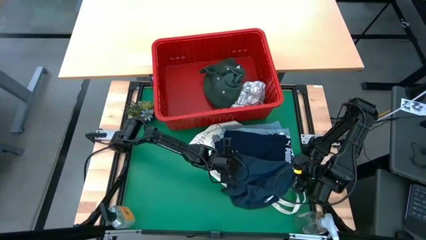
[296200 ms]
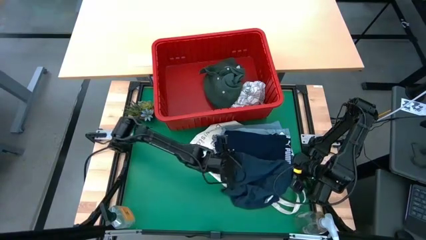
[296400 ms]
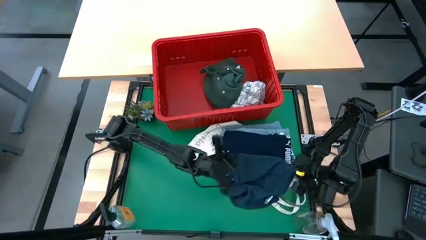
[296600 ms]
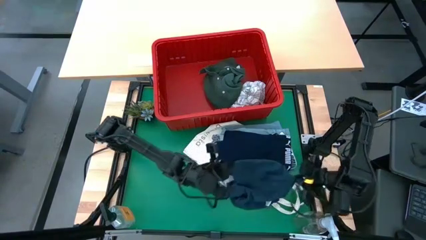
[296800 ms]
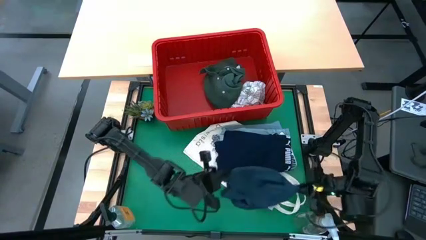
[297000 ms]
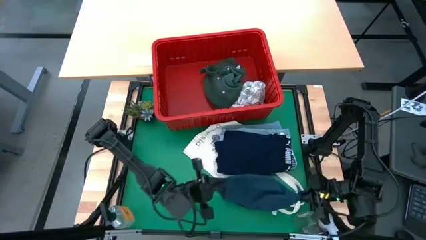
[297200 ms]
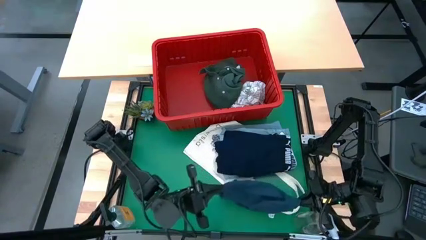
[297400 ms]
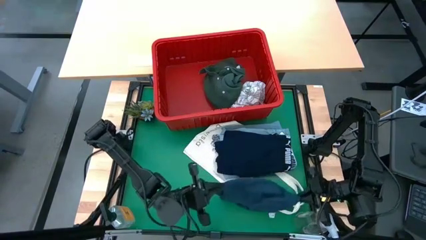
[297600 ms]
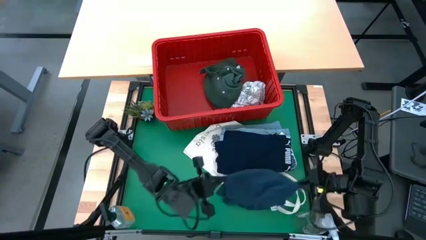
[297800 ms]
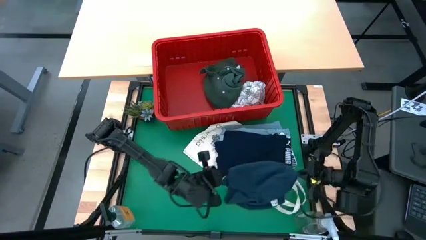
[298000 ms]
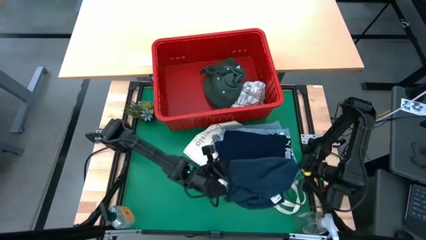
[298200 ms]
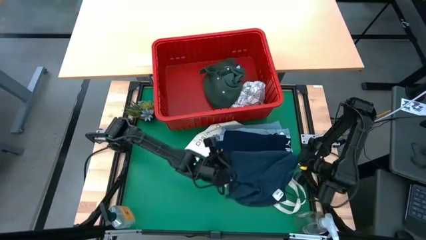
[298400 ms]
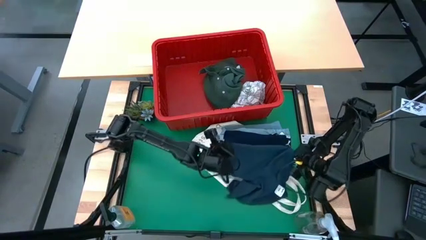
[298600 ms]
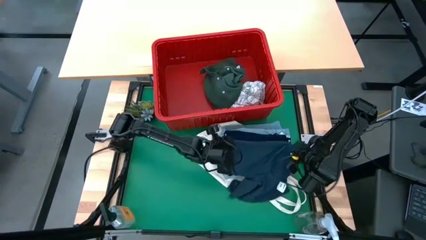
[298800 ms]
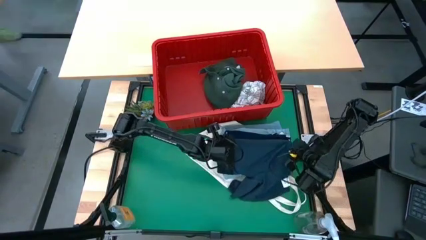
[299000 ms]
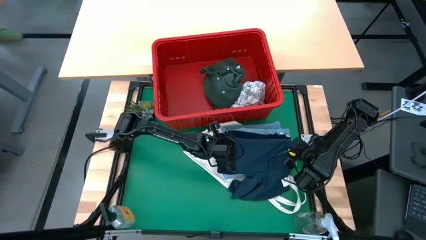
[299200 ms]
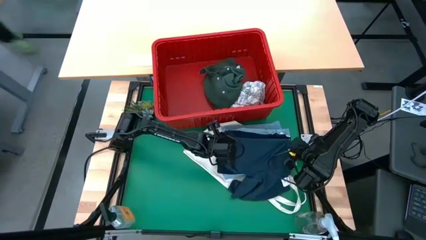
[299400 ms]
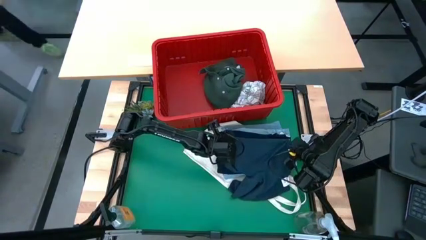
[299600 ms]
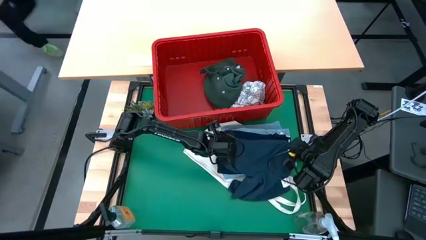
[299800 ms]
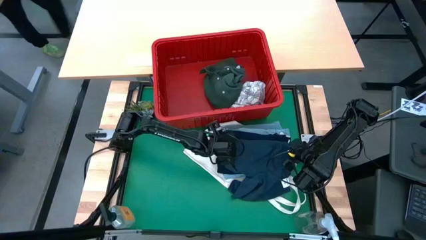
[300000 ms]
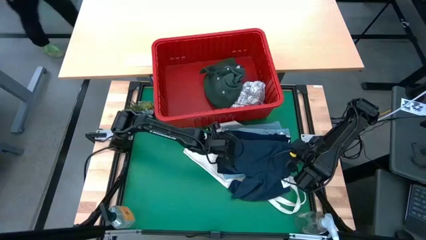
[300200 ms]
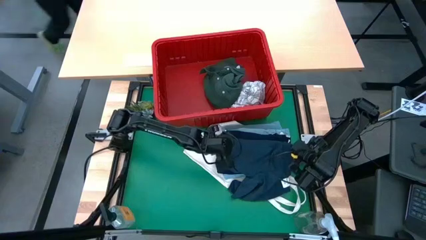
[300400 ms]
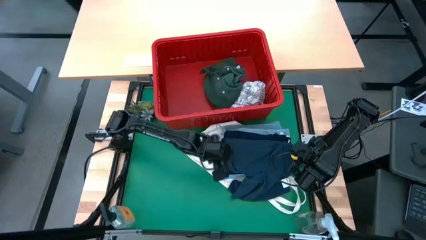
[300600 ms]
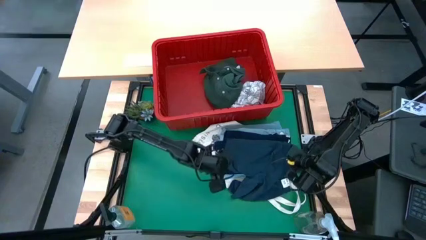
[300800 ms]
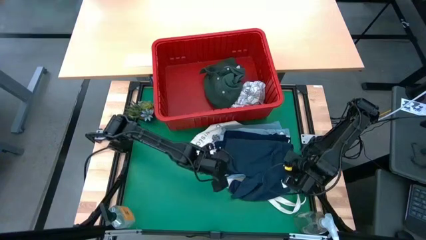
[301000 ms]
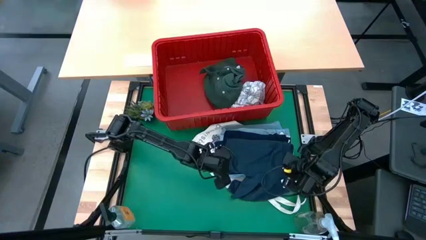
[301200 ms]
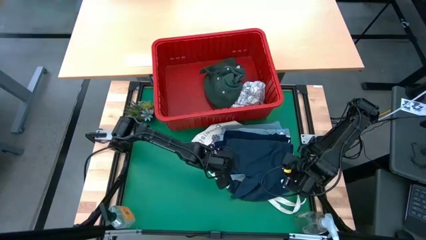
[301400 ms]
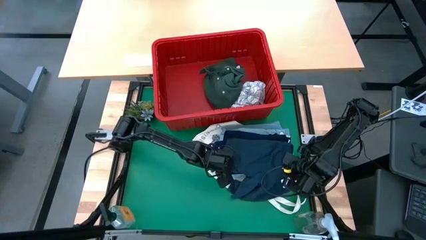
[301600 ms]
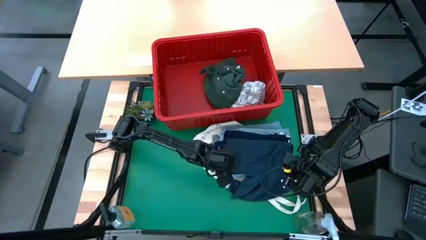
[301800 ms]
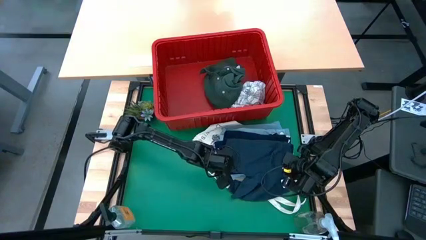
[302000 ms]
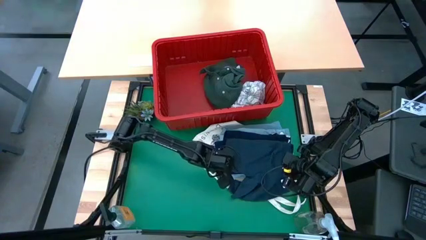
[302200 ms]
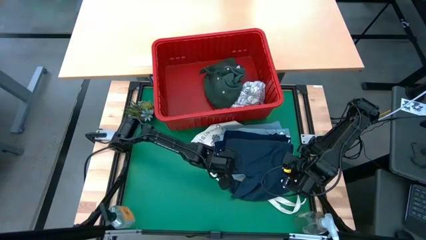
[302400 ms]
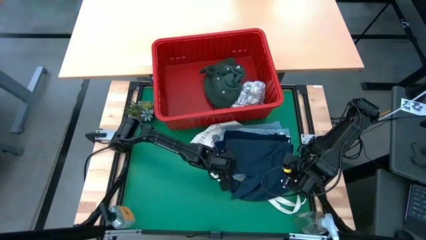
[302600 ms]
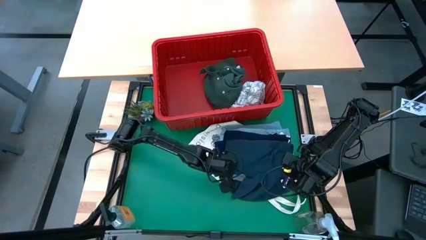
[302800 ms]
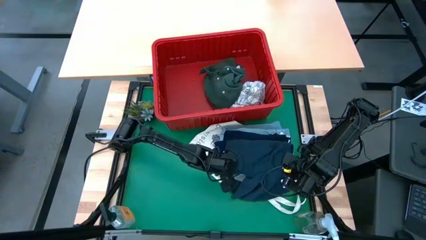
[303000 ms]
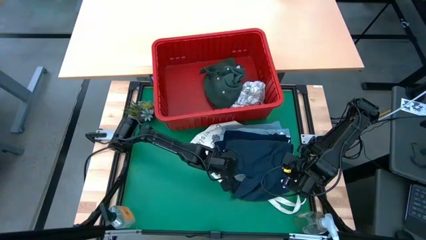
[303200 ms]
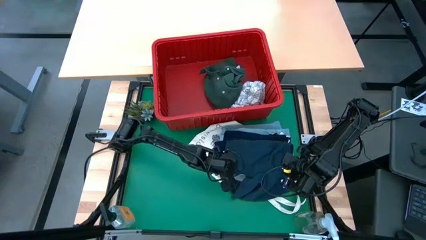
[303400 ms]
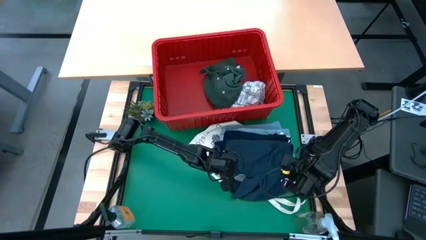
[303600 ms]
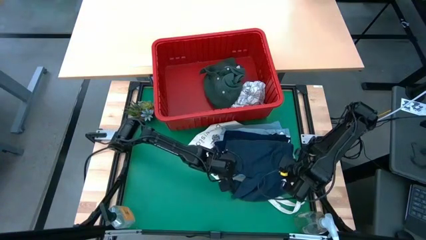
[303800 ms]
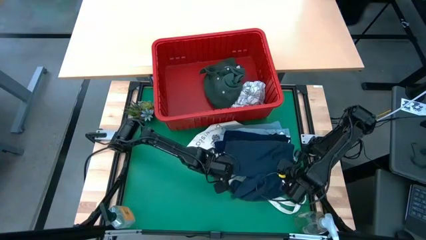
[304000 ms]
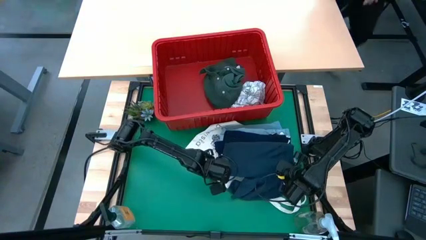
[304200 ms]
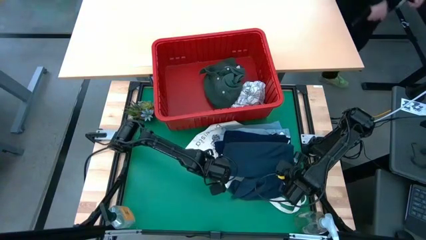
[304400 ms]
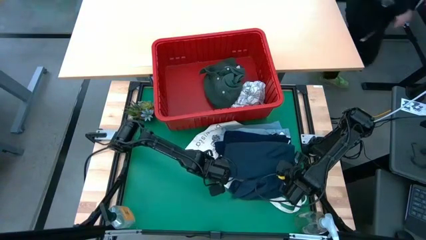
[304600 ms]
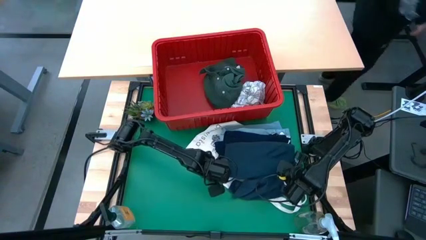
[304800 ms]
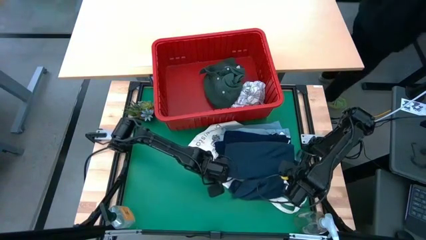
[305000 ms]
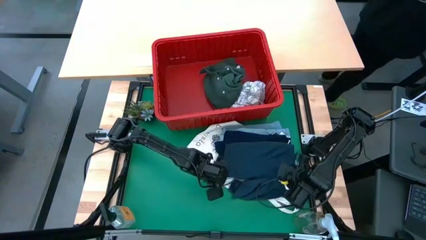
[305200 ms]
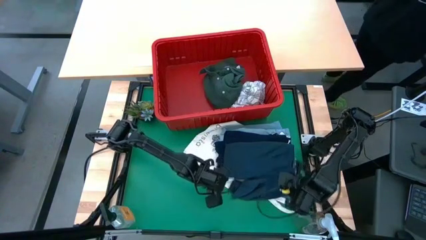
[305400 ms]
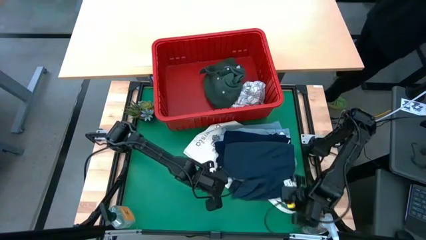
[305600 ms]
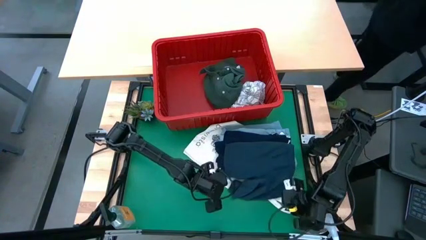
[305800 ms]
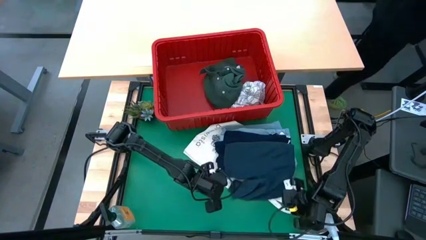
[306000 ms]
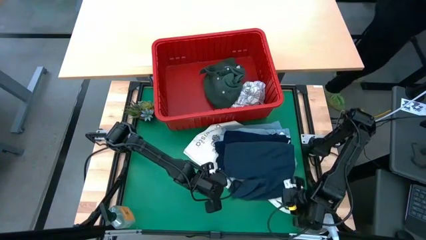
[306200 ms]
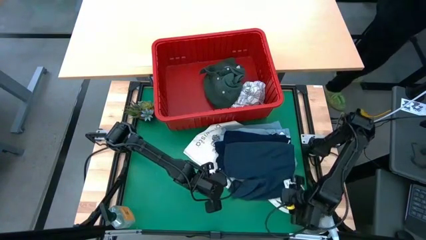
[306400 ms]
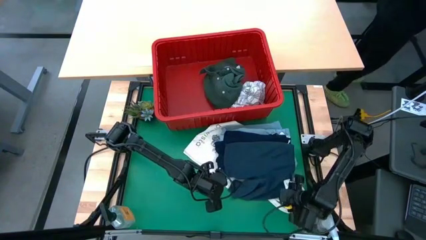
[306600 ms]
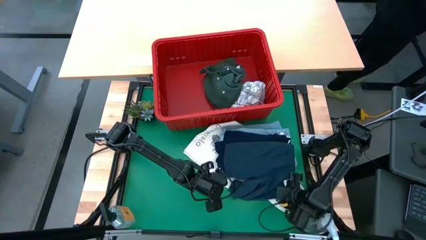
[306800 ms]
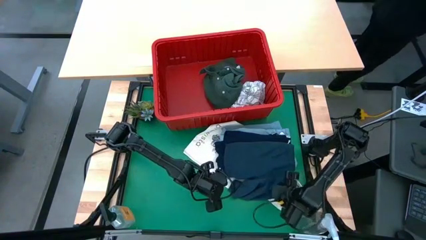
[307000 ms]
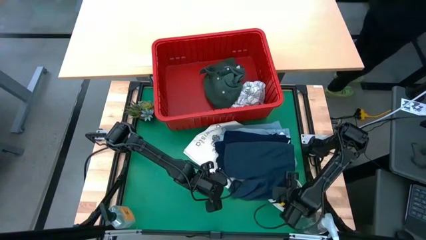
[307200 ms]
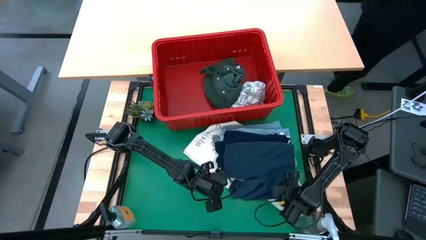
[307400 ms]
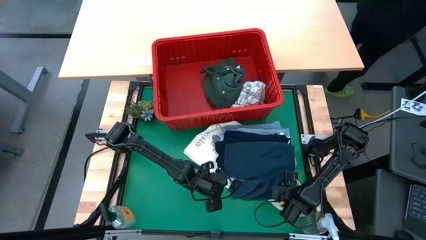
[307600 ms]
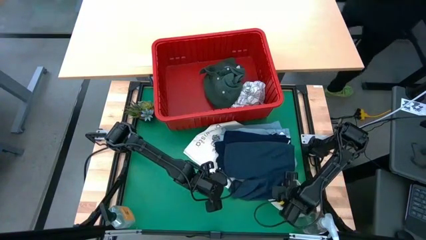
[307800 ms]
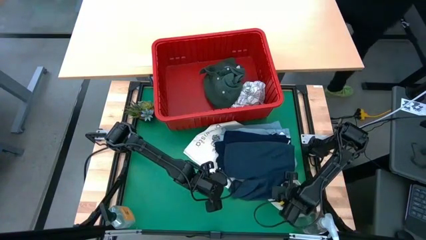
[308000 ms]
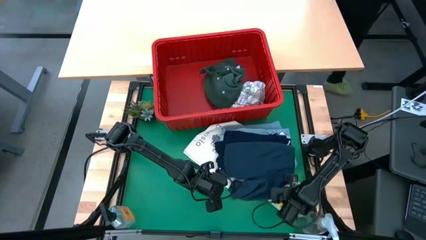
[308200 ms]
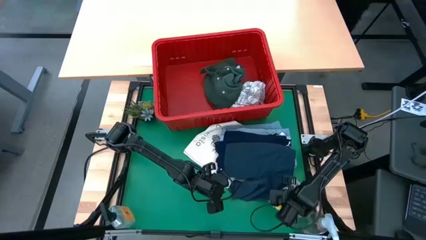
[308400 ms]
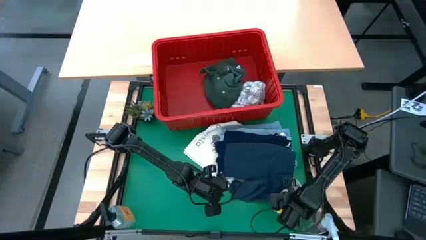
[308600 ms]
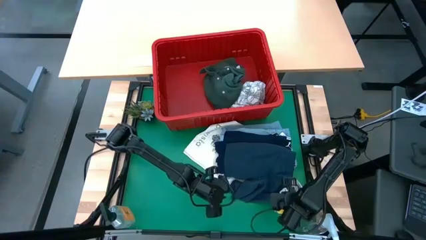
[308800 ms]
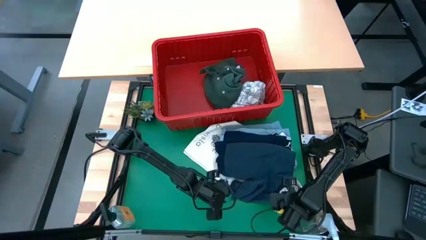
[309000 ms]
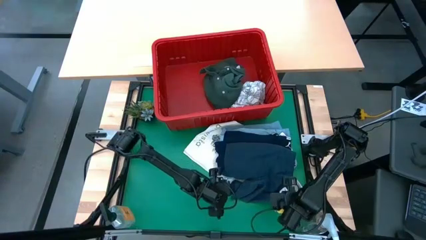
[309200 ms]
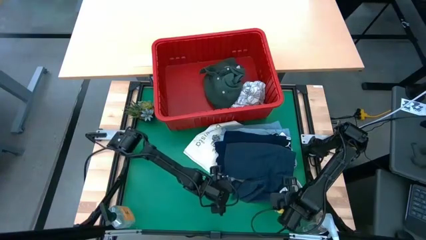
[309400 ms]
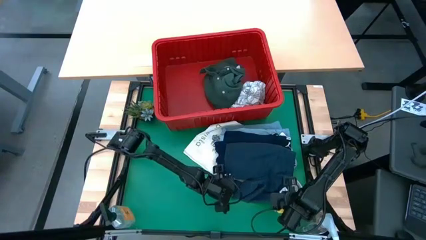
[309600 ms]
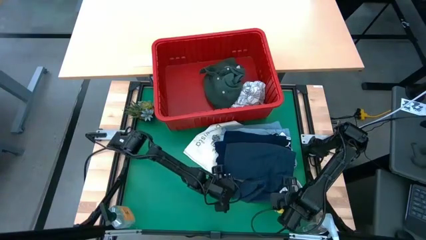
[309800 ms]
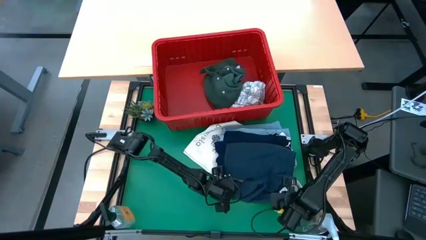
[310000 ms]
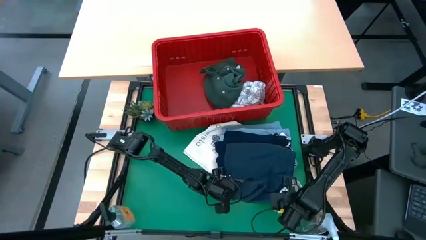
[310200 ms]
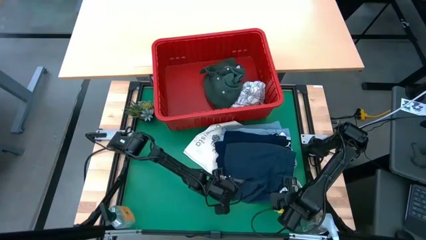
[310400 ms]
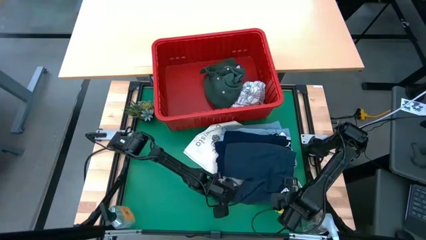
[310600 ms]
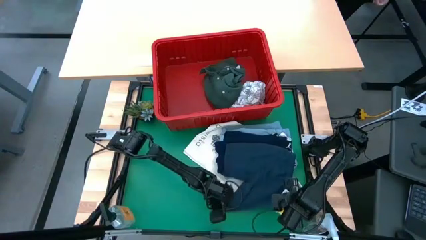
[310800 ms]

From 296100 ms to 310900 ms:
Task: Fold laundry
Fold the gray shorts

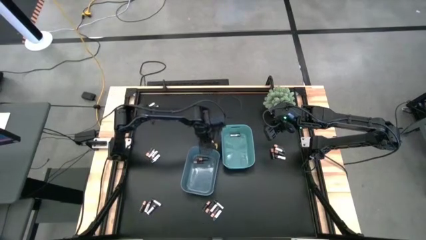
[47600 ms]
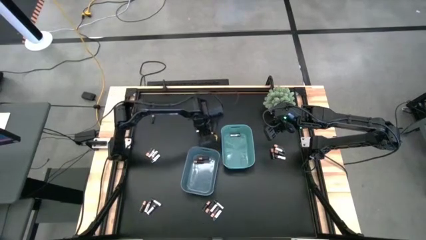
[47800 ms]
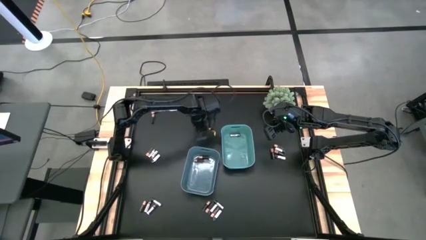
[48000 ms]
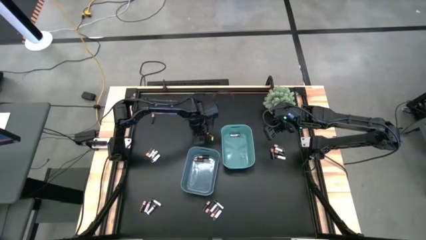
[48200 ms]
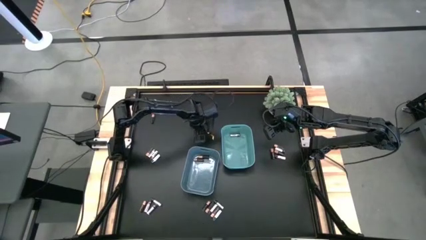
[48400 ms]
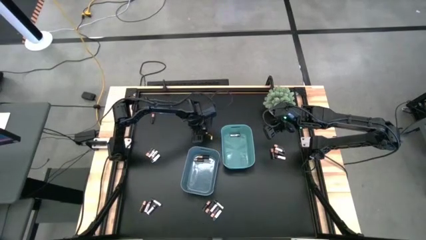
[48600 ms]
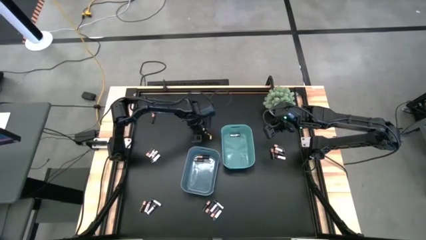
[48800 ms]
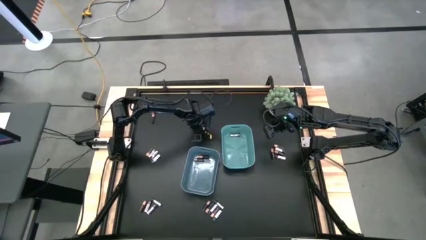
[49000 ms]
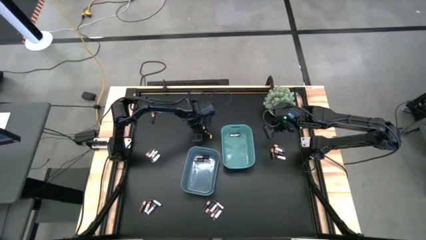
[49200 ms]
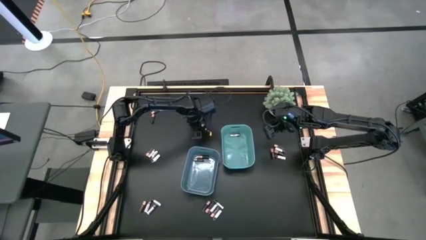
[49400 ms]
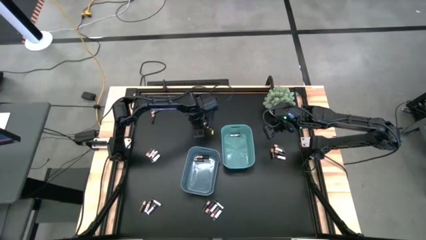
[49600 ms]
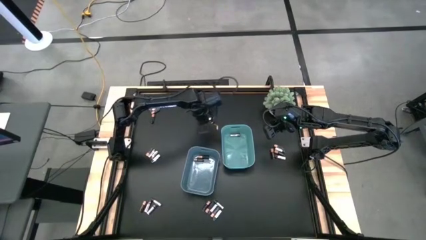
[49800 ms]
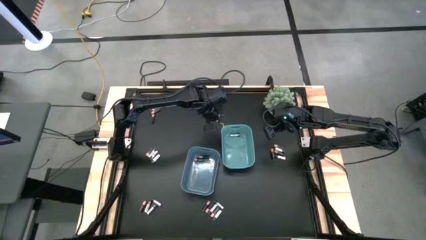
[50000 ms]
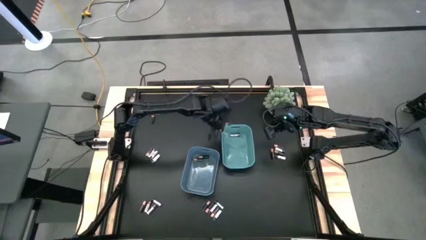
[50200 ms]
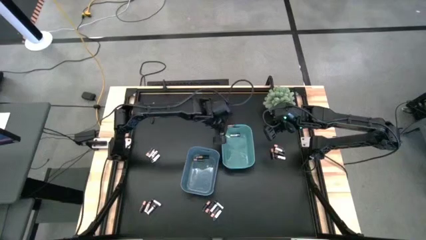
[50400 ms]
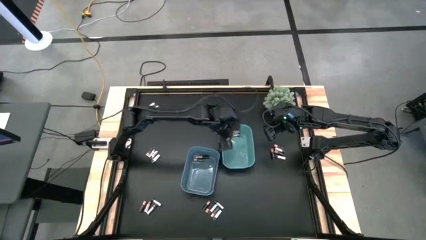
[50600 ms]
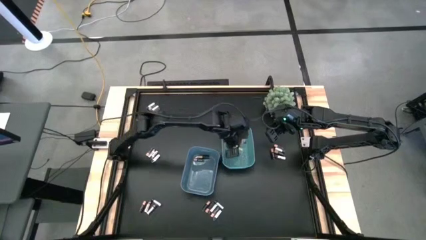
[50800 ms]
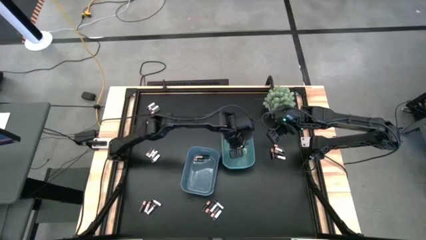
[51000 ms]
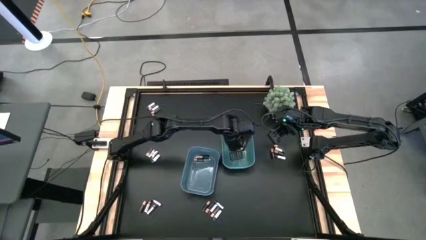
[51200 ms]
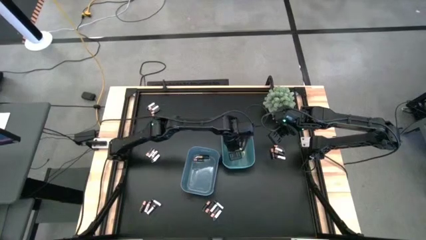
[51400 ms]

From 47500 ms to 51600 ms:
Task: Sort batteries
Put the white battery into the green bin
